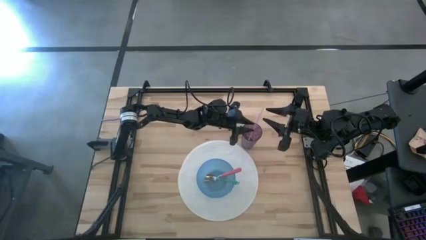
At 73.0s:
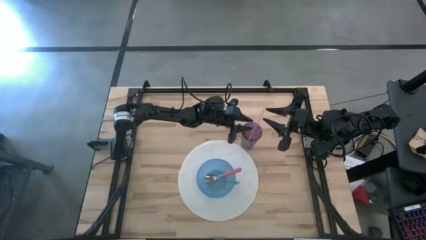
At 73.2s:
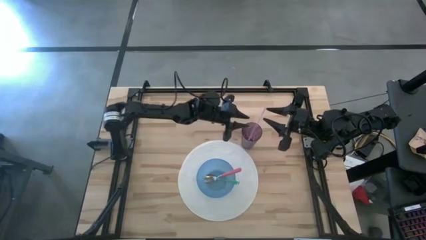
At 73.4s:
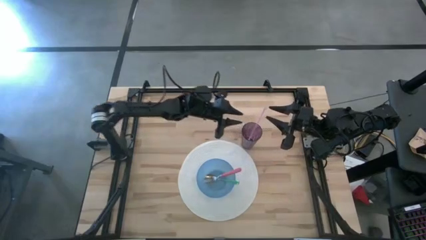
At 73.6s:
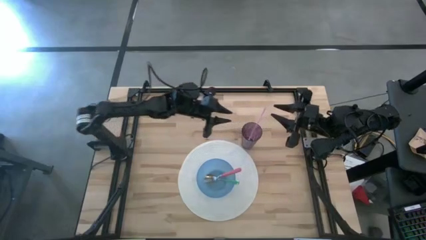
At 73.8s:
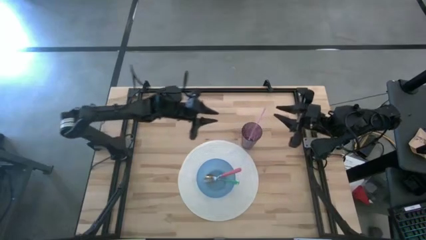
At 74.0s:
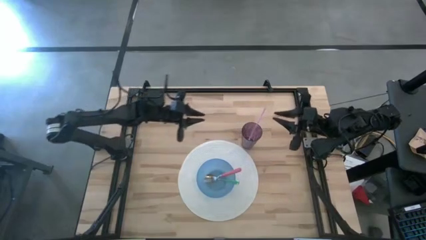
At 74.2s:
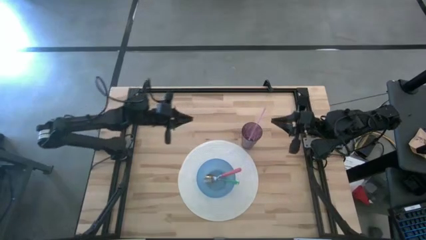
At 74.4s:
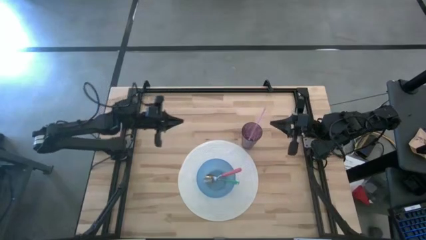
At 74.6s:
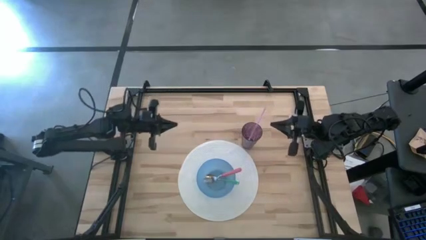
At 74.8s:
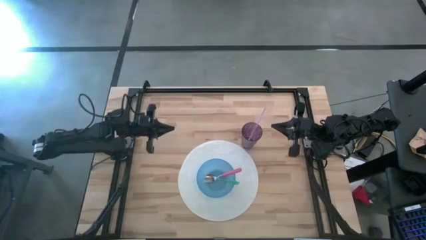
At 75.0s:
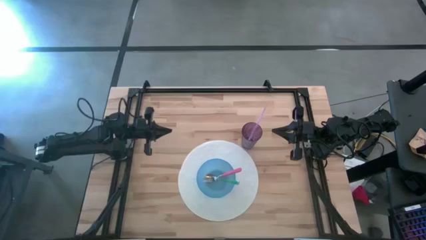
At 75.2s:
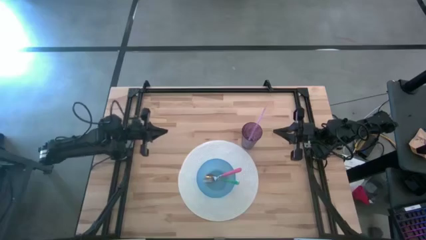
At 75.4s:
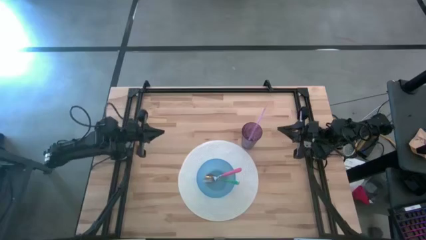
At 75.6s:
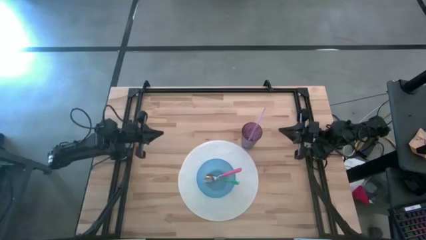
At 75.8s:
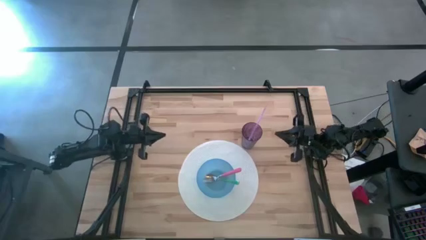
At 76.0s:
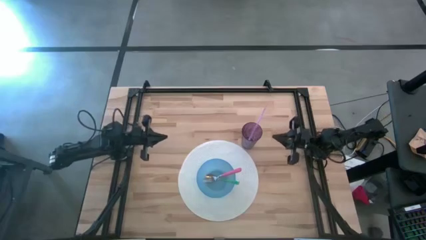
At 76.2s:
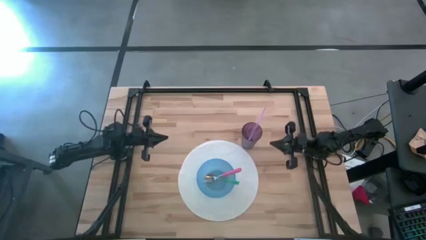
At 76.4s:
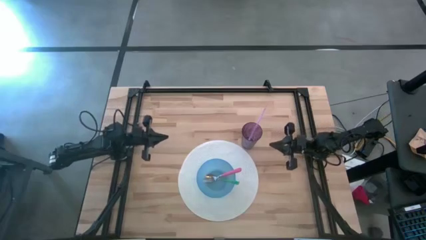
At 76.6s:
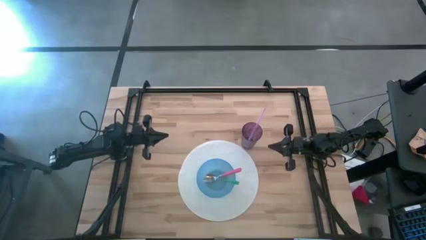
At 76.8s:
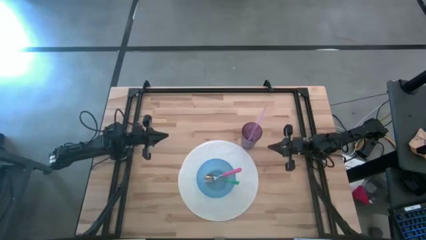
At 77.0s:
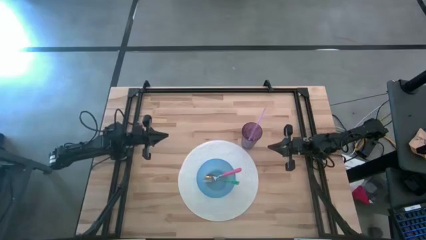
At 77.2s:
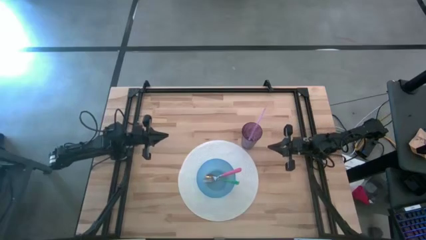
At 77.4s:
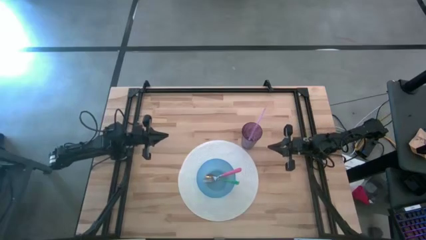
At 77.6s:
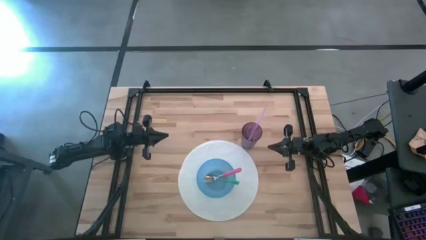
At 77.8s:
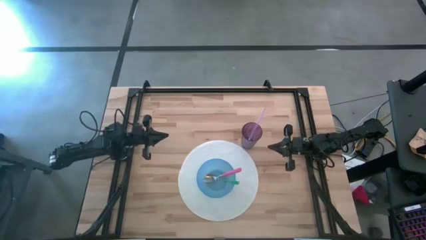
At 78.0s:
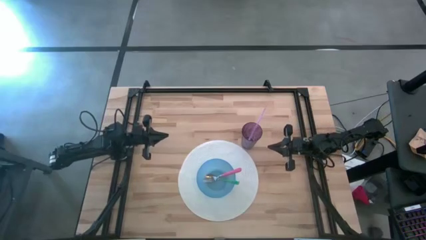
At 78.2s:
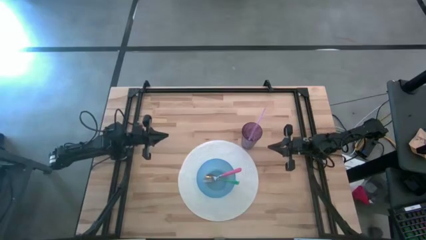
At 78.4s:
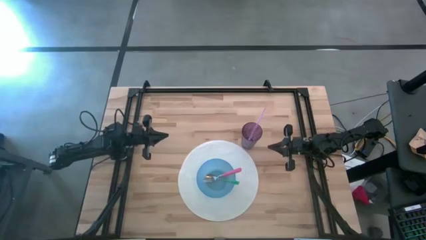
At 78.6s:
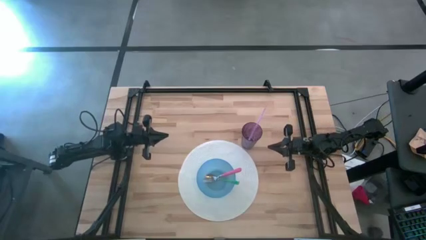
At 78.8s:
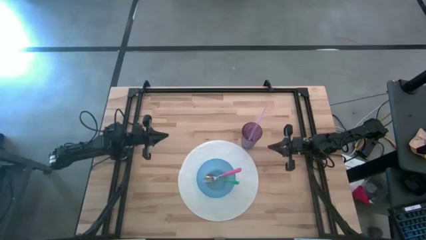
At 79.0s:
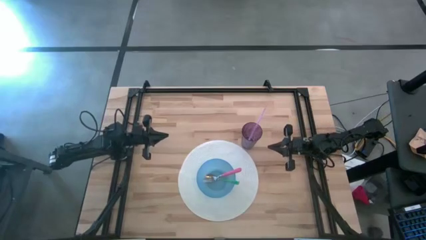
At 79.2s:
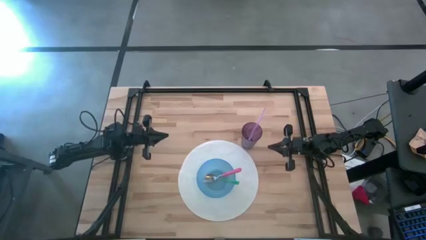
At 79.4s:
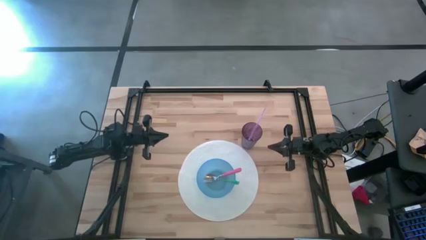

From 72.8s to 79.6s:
Task: Pick & Place Utensil
Return to Home Position

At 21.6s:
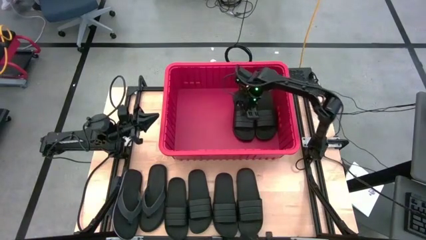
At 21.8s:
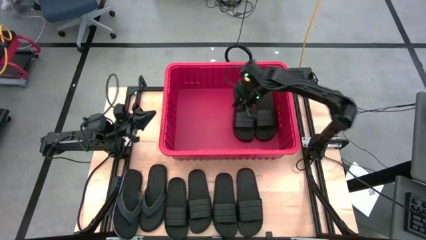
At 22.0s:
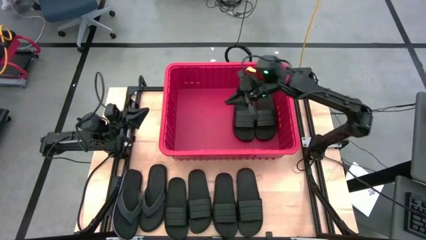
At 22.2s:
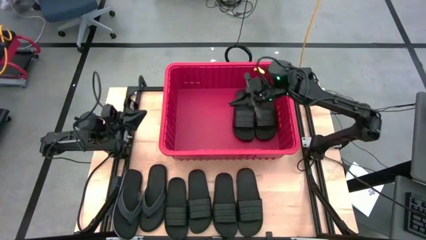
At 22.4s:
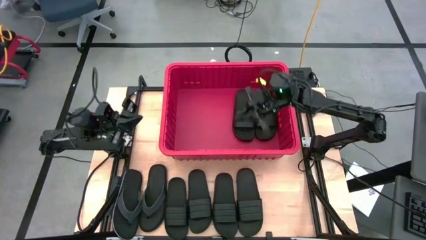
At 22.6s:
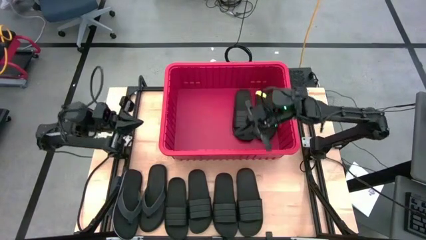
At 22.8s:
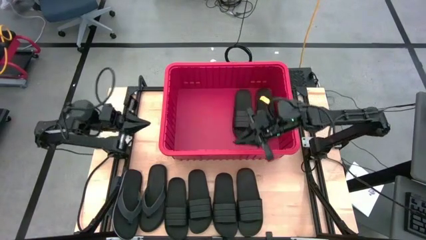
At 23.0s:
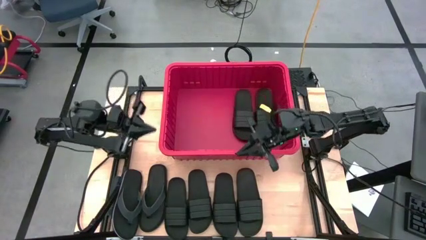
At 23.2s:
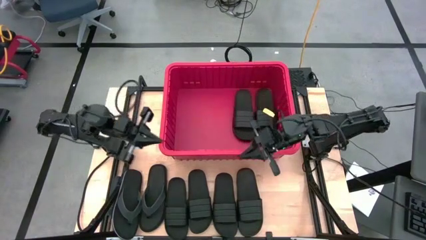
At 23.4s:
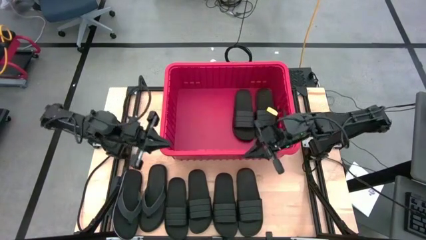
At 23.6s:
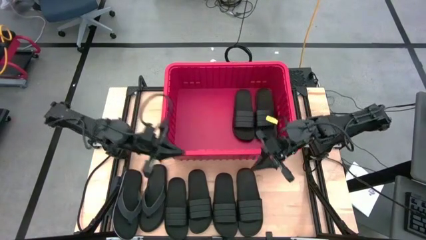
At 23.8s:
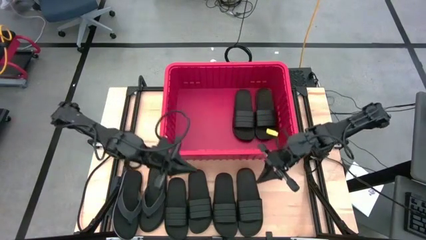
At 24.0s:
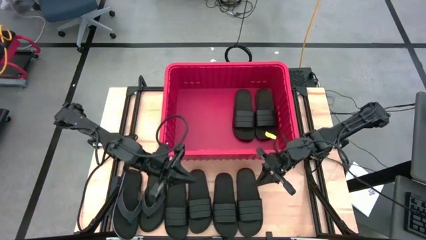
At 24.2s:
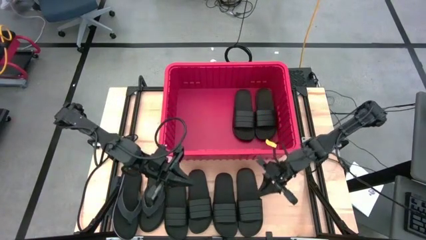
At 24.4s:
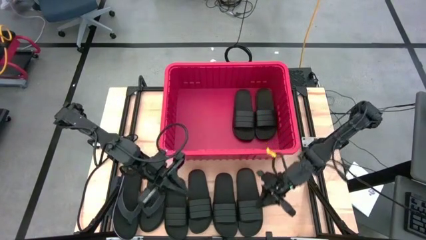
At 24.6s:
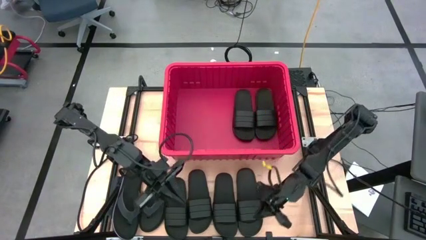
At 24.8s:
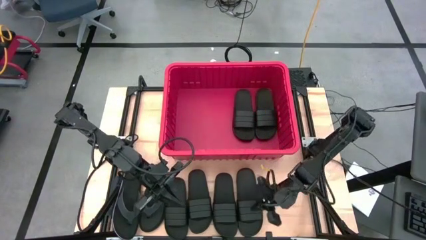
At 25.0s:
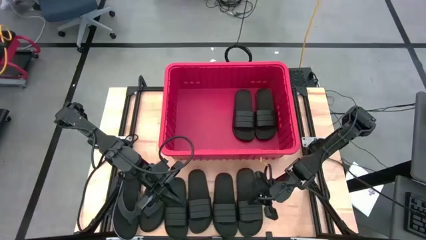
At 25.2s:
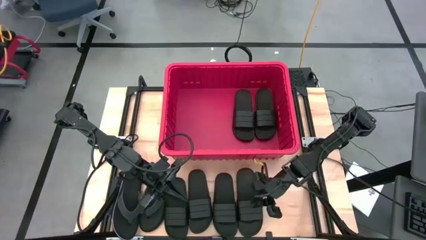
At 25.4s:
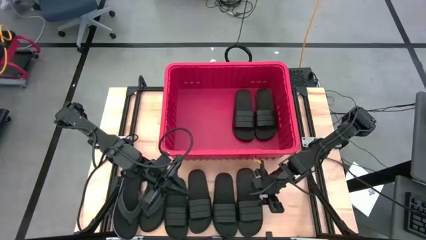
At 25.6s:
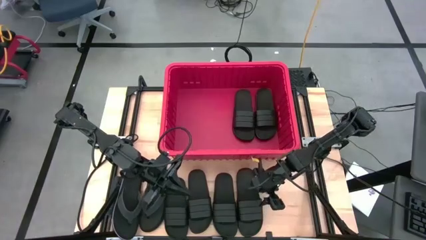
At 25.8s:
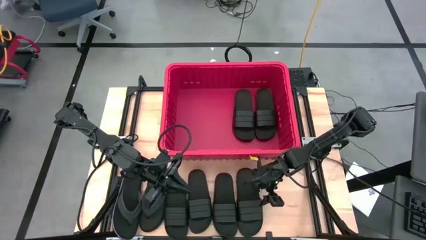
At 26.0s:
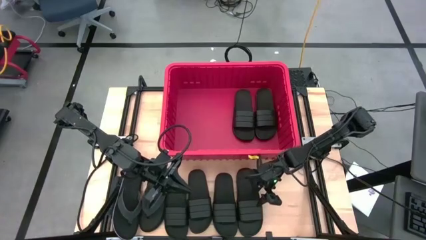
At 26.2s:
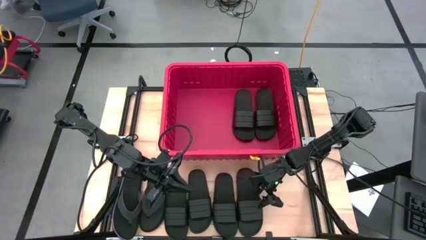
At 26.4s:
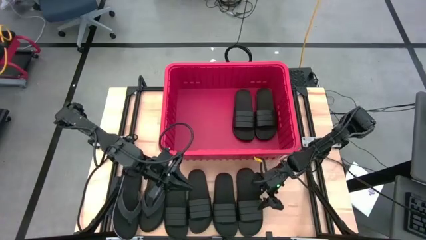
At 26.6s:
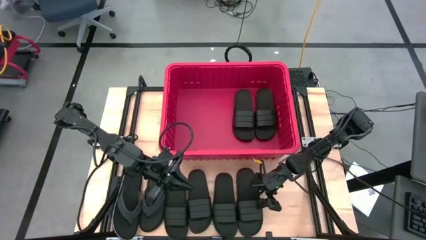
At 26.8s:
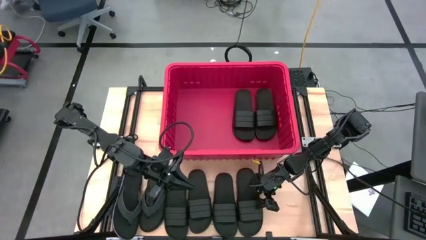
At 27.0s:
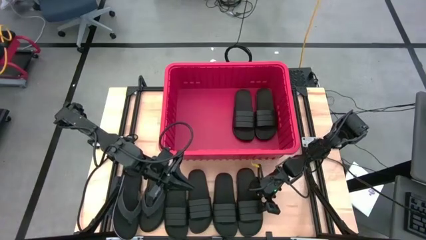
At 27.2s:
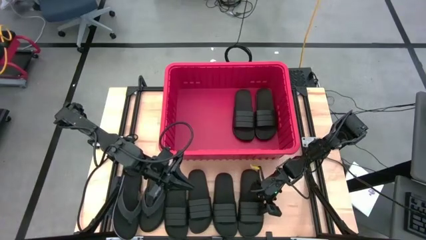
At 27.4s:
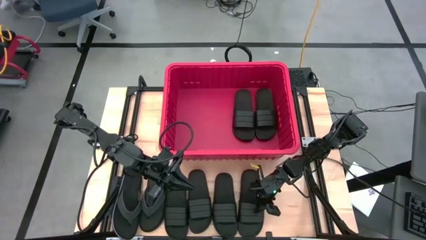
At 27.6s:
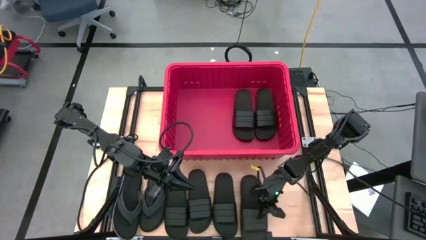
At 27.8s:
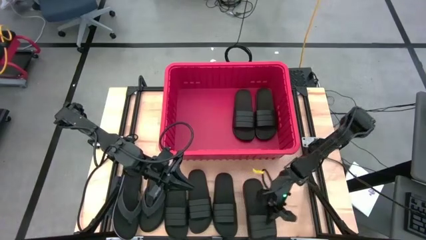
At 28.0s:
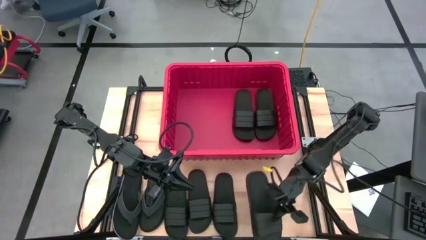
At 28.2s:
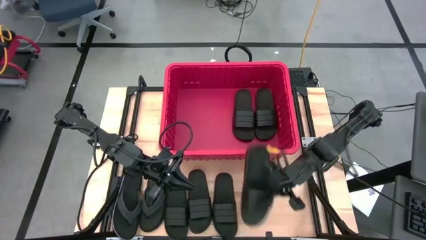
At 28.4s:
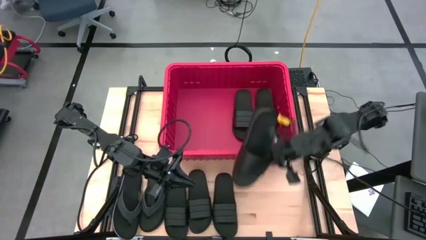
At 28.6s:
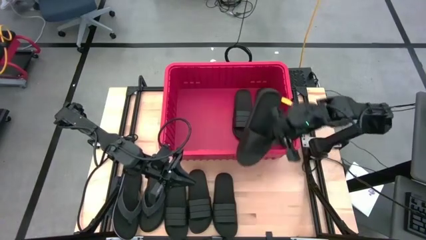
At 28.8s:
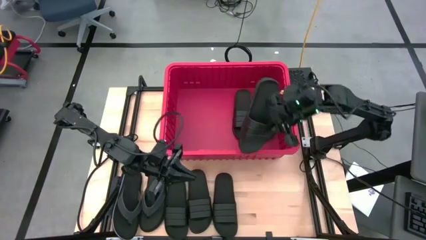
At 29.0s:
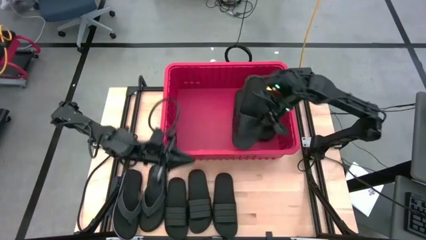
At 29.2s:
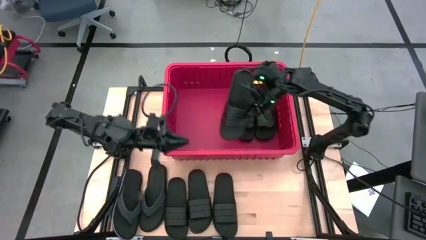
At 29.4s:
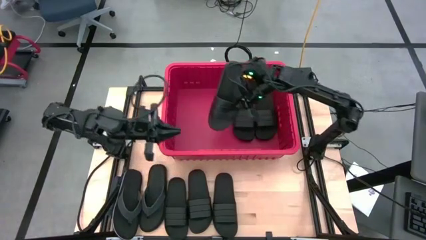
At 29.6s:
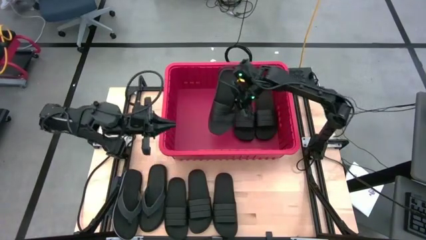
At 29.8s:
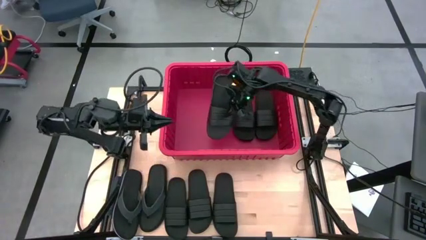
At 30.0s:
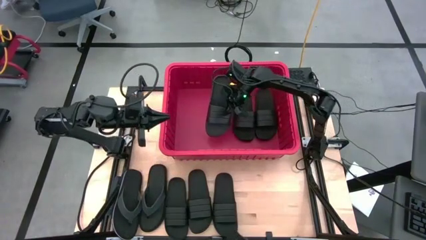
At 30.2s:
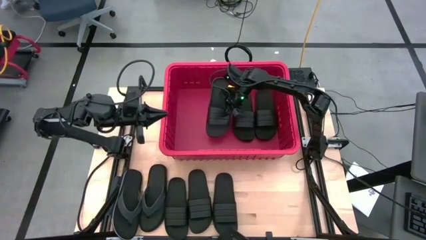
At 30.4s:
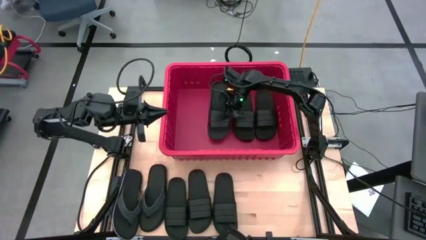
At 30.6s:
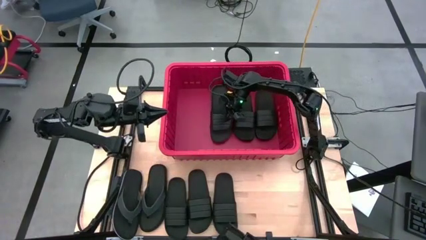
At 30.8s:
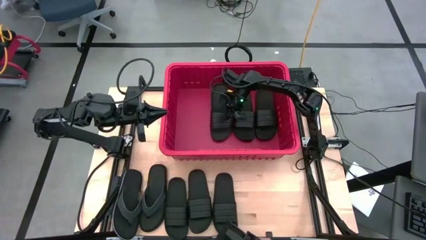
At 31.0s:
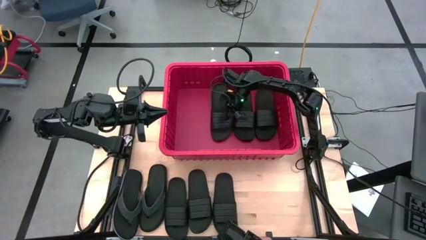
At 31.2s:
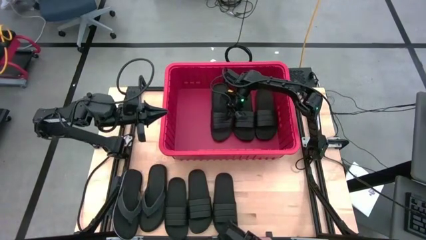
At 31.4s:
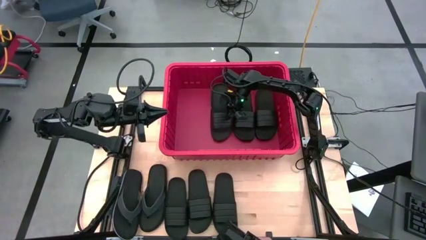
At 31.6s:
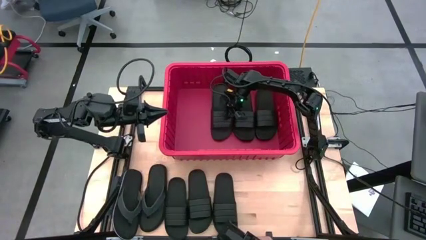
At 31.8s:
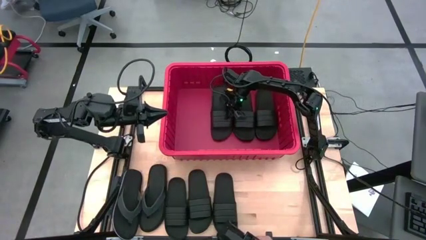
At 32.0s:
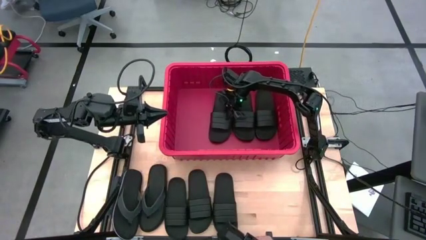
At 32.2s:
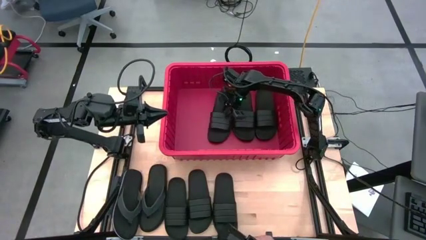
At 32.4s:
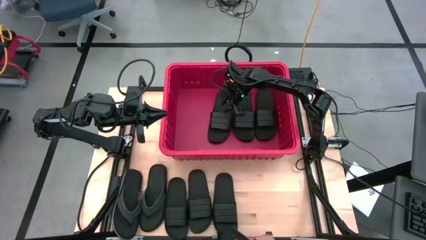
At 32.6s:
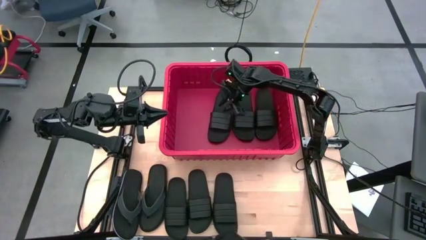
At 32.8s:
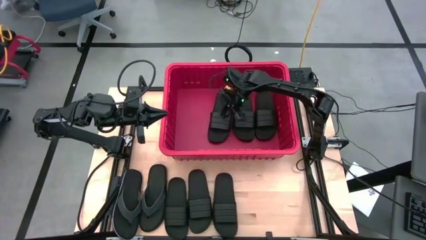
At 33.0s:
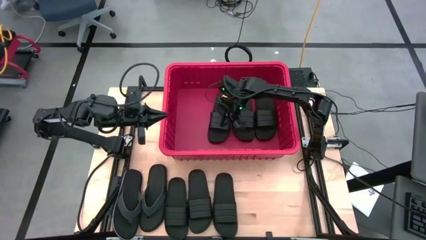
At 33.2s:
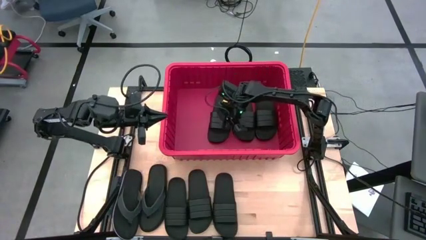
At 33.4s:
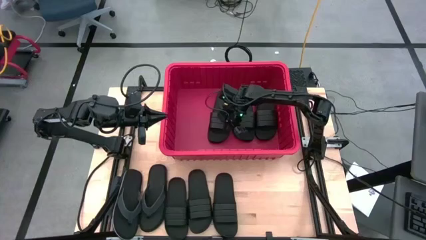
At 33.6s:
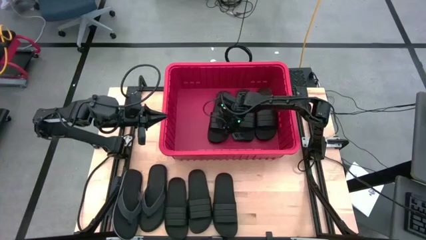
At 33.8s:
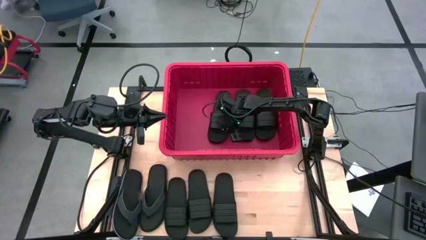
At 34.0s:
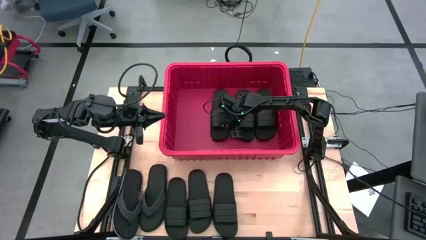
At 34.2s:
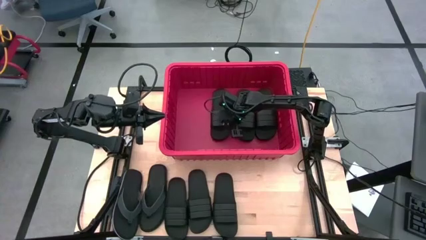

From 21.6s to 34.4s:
Task: Pick and place slides into bin
Put the black slide into the red bin
